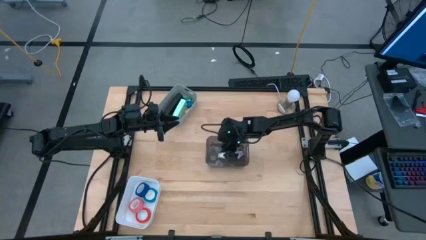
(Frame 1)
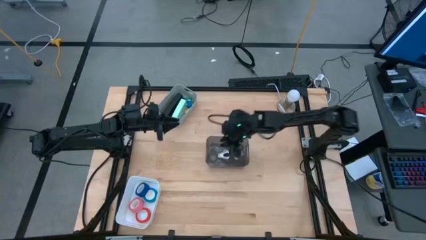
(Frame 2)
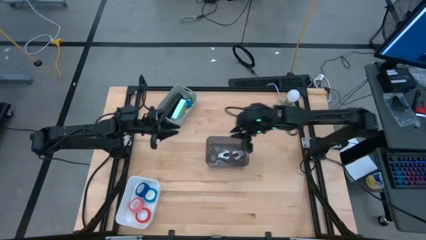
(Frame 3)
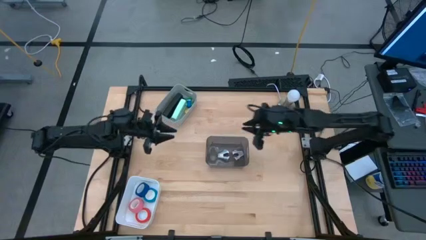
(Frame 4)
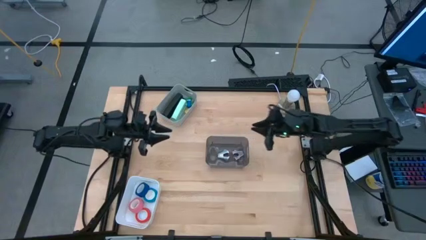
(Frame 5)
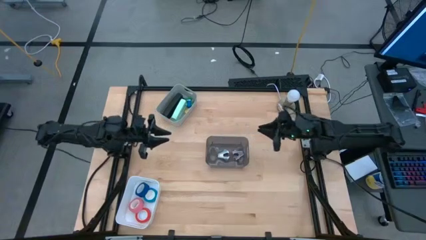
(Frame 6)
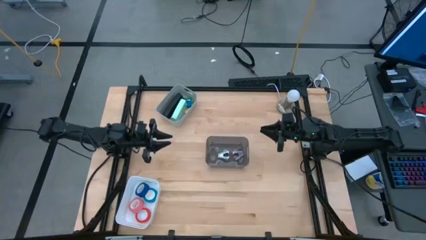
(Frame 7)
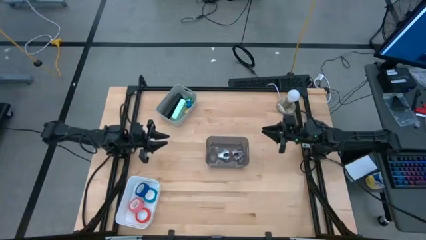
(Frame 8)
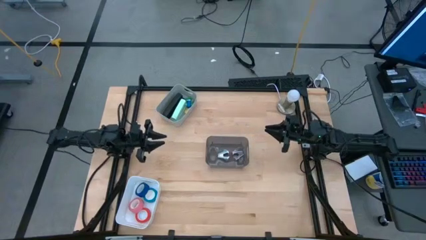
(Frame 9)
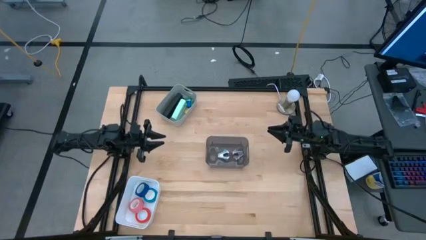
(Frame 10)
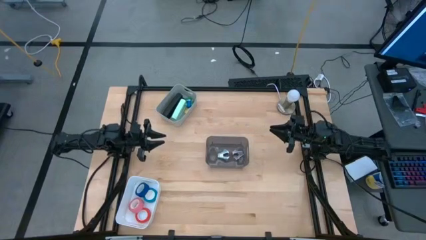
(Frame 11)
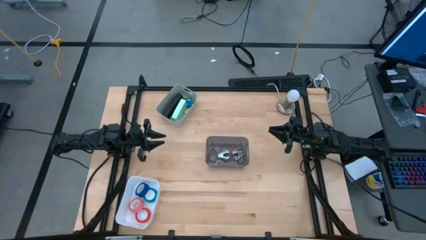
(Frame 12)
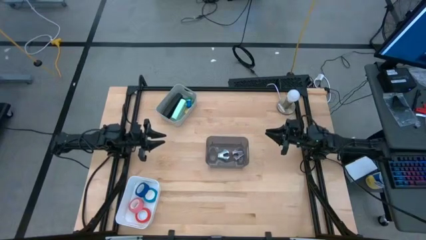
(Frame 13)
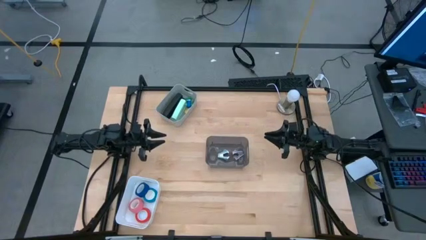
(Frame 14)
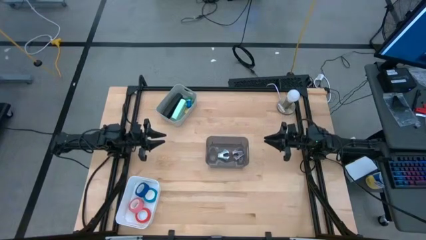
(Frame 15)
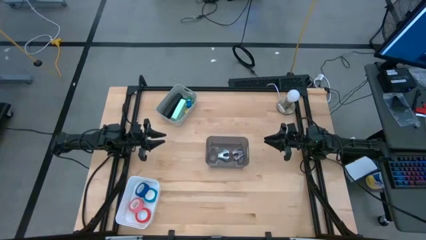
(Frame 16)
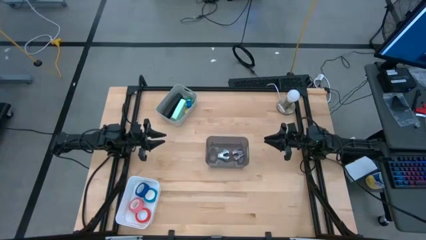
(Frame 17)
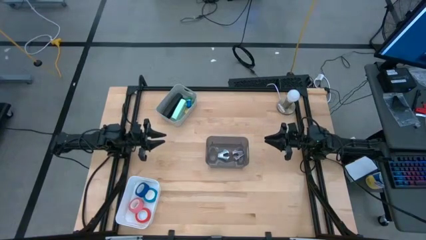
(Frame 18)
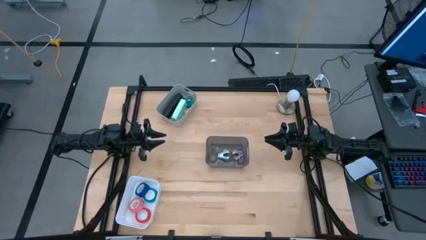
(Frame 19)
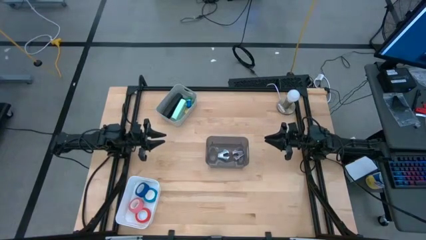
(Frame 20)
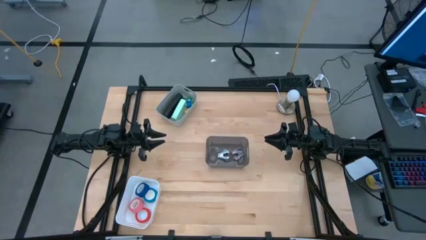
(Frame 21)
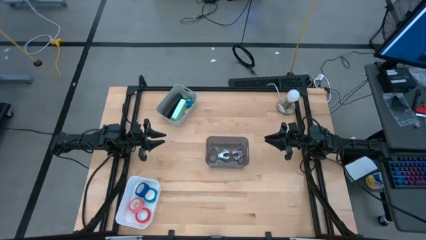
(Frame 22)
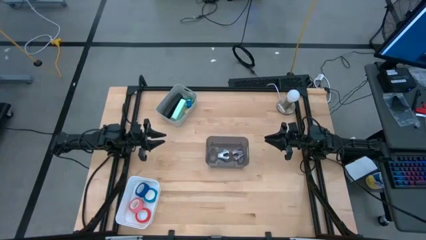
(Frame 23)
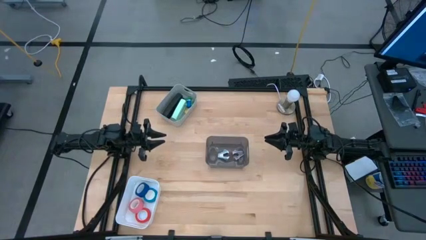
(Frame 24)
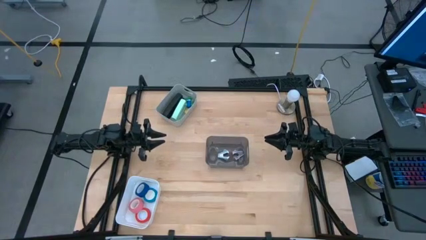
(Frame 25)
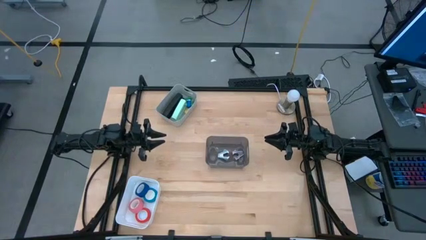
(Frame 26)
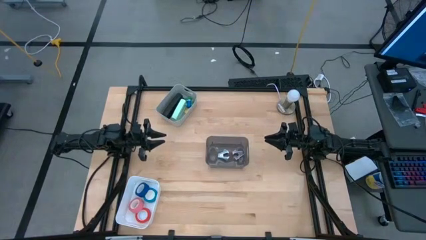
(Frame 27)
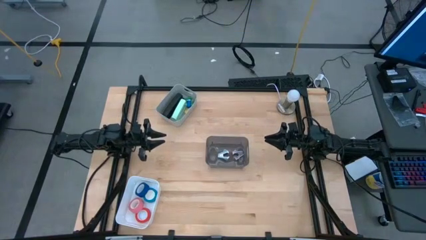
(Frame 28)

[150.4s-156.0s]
Task: Pick and place Stapler, Stapler remover, tape
Return to Home Position

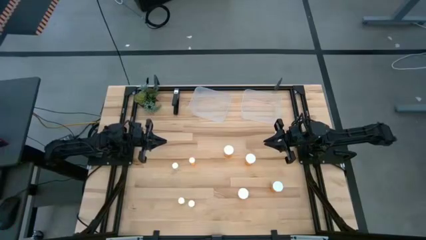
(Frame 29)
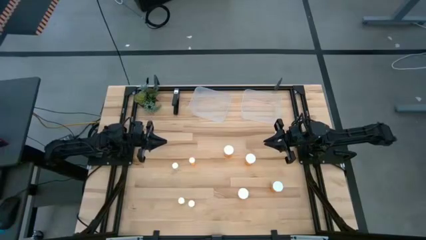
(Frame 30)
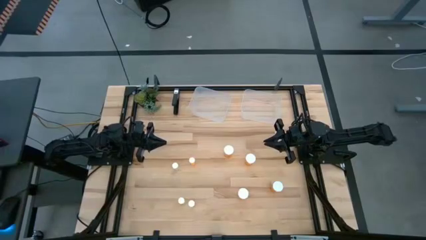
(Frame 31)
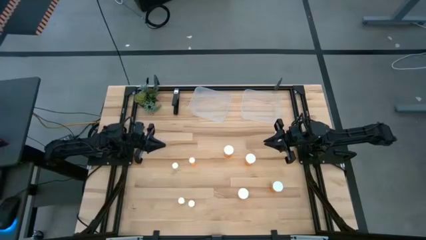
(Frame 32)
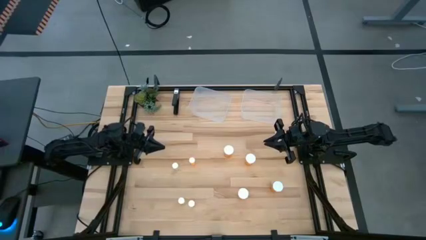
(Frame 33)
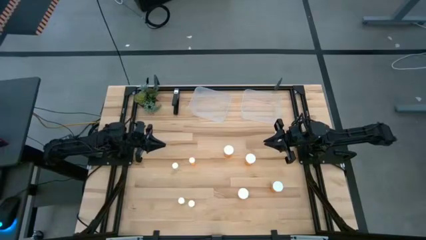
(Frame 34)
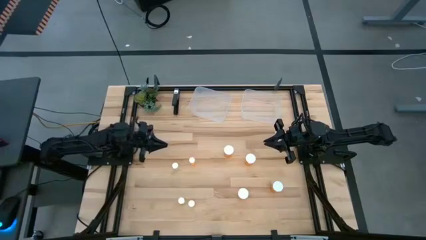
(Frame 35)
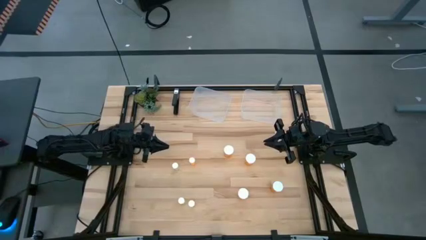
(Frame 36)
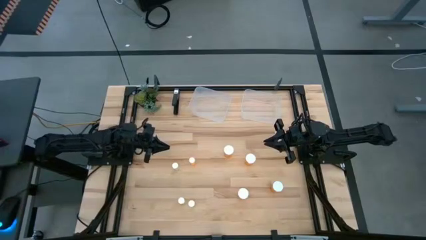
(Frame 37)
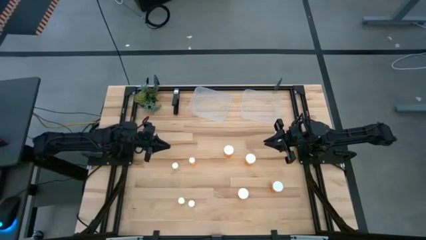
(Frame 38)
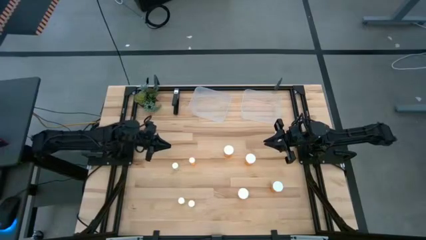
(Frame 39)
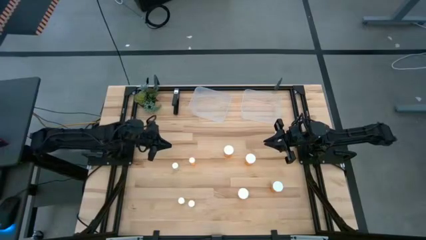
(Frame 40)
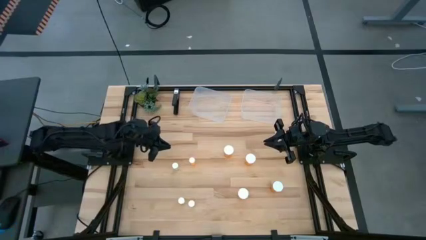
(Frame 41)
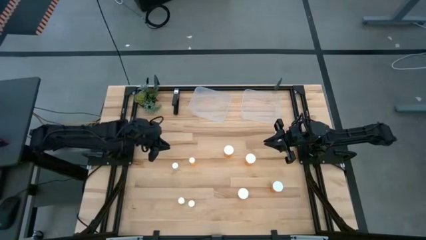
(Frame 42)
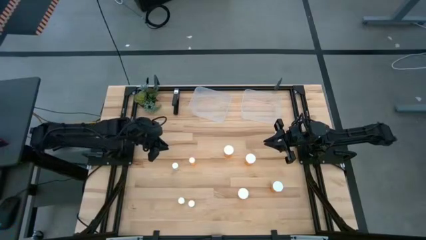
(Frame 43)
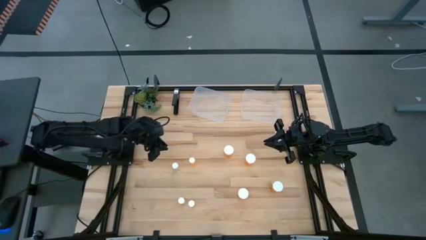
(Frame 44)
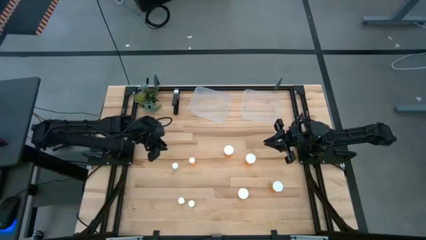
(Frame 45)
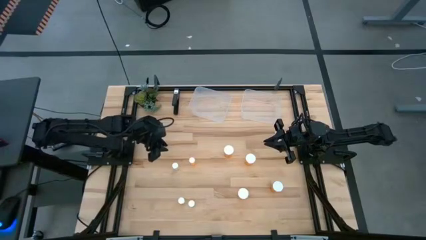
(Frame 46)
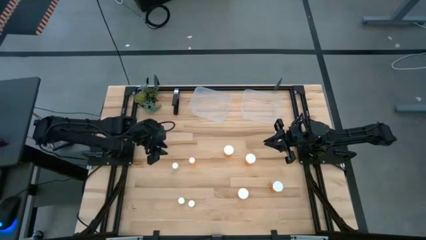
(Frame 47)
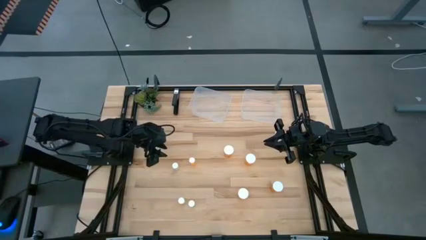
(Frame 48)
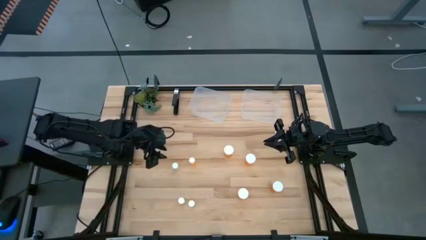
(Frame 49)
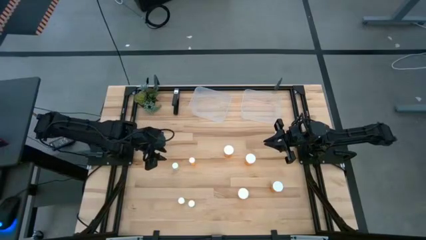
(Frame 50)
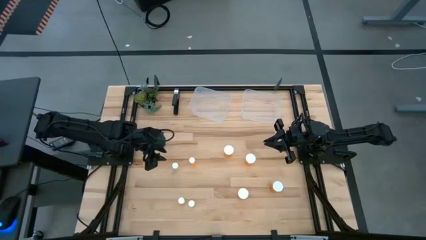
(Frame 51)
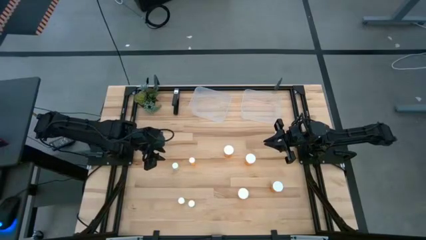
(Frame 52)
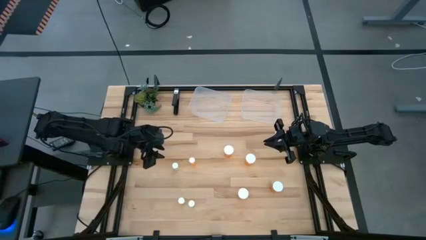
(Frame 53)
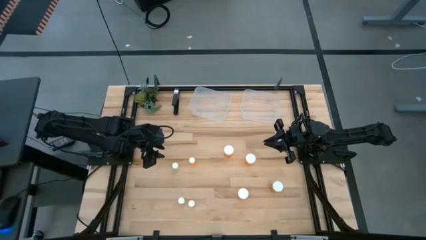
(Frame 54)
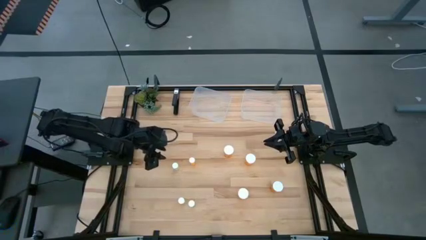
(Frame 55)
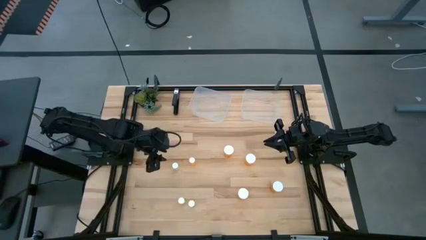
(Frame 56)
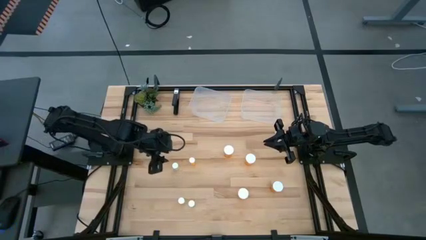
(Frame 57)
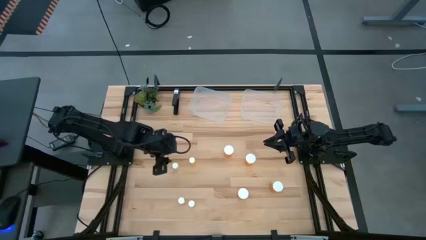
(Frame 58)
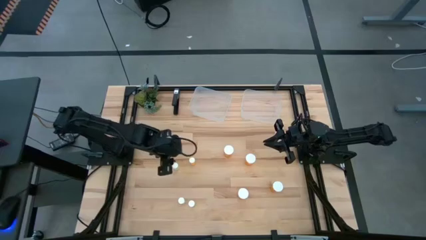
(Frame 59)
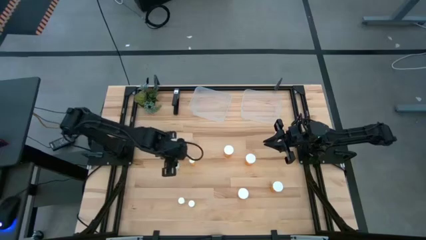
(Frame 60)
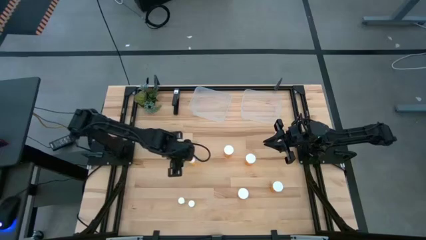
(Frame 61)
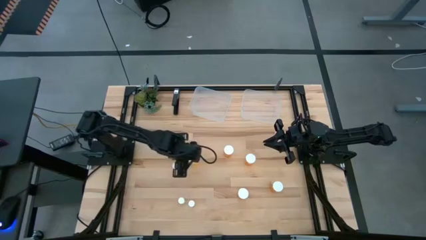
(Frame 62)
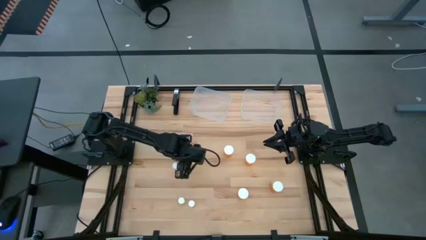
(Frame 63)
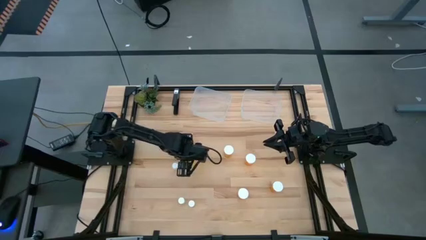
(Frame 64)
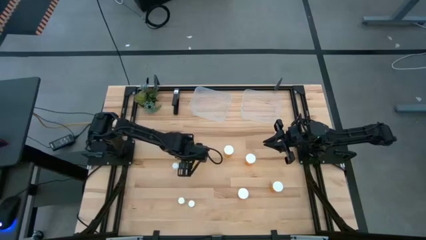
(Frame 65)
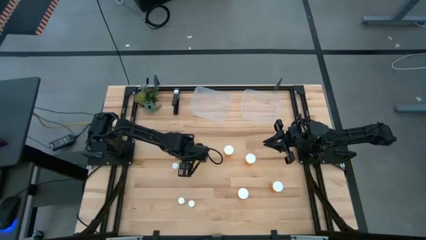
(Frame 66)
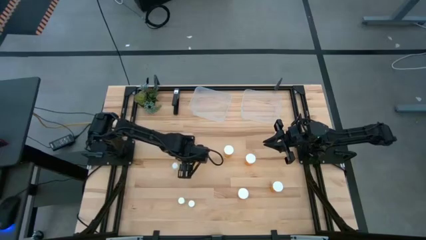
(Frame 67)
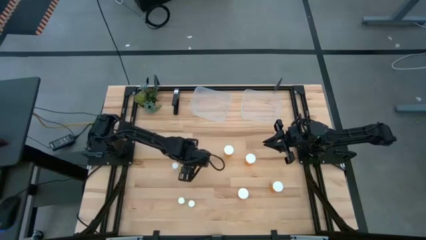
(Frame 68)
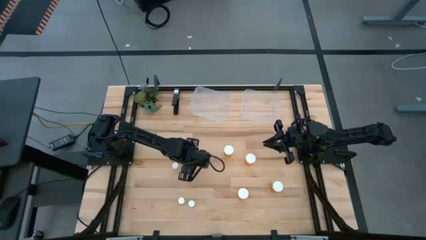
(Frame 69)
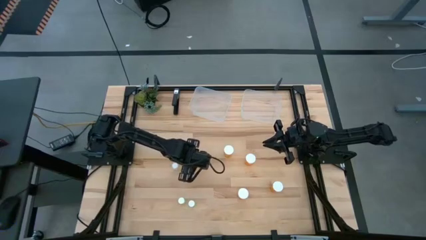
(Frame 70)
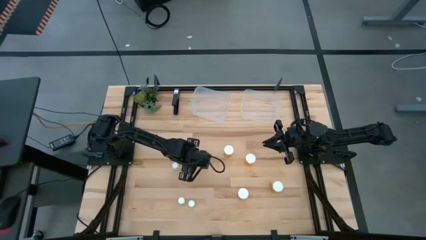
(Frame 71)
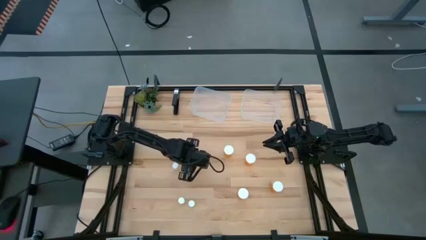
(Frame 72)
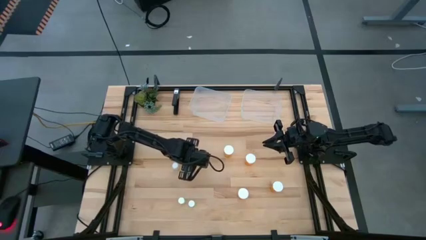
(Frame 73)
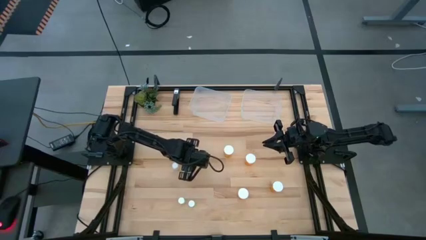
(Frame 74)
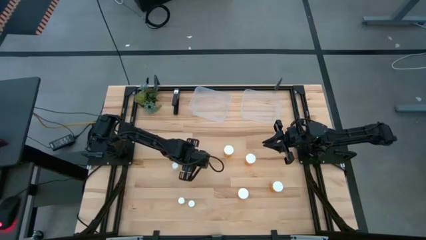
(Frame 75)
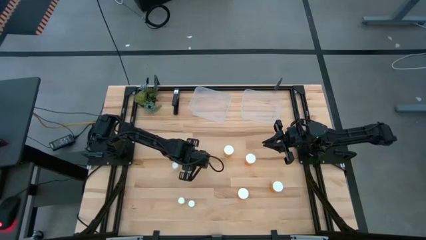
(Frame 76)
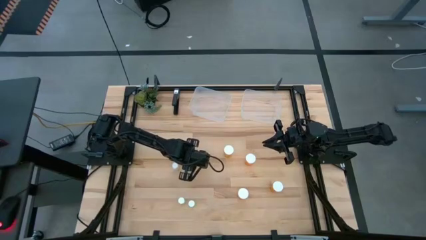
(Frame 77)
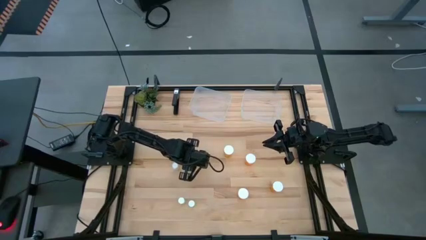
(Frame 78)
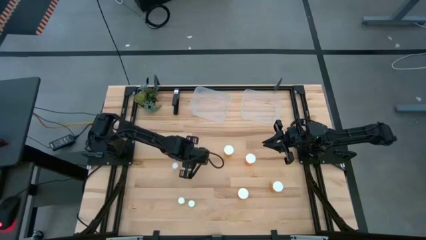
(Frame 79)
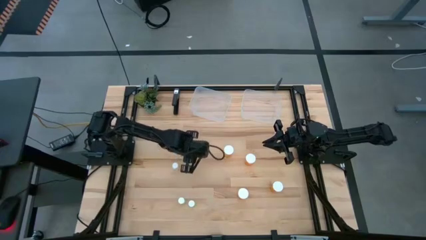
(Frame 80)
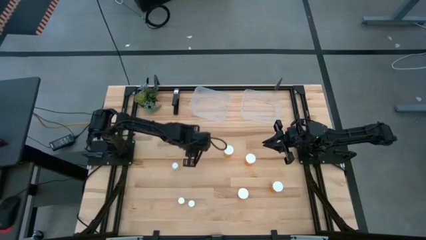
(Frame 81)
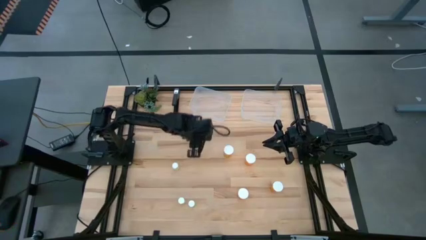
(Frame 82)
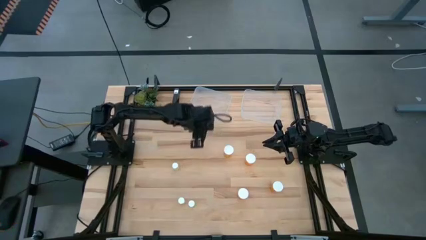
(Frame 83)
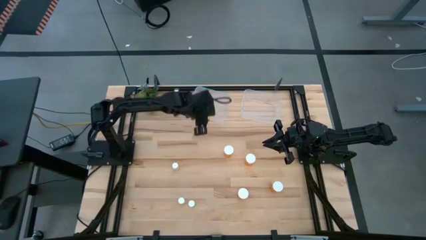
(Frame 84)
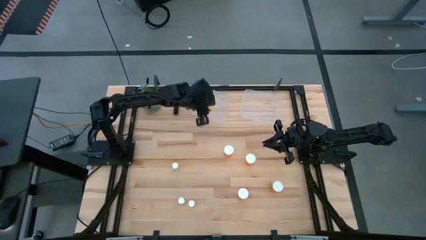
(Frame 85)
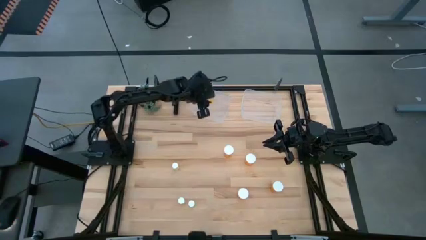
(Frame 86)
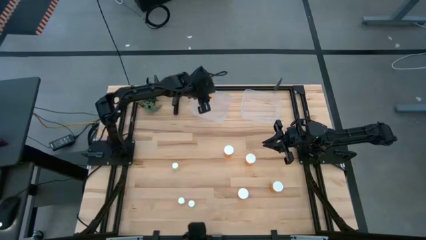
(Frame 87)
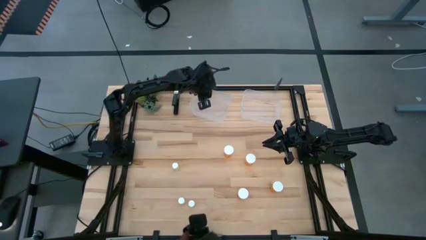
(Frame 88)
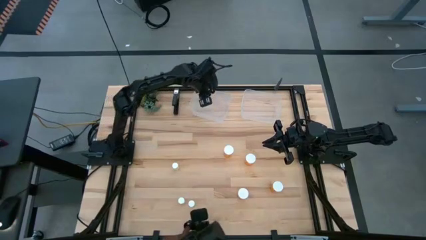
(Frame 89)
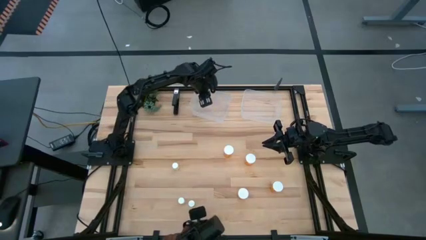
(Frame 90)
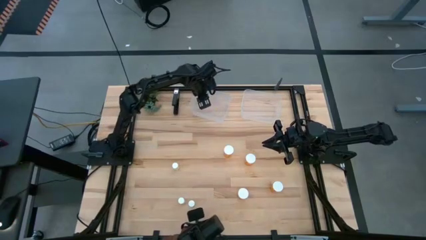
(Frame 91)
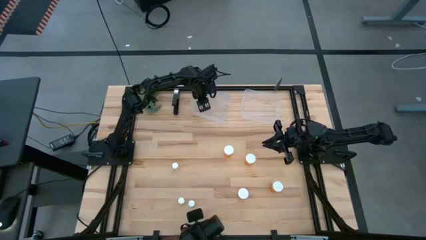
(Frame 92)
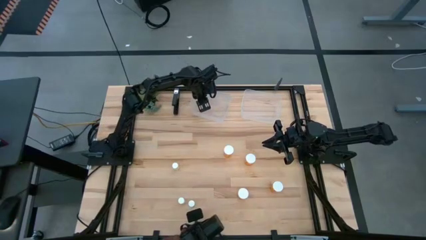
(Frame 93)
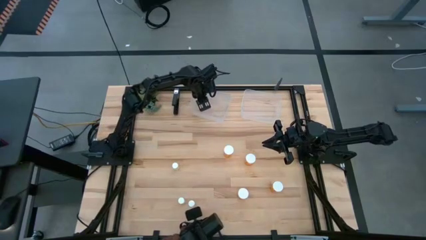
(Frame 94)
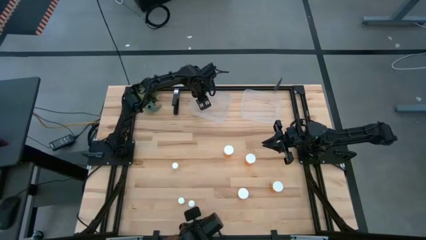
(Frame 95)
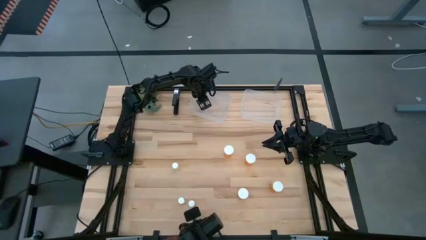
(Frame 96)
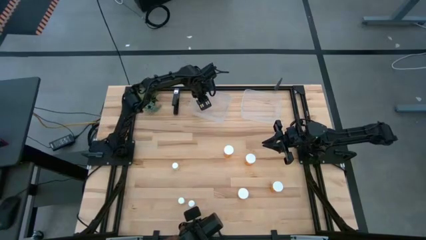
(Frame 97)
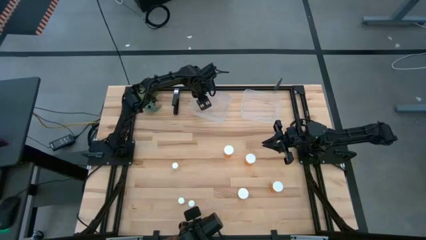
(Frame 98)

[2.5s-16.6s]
Task: Pick and place medicine bottles into bin by pill shape (circle, oval)
Put the small orange pill bottle into the left transparent bin
